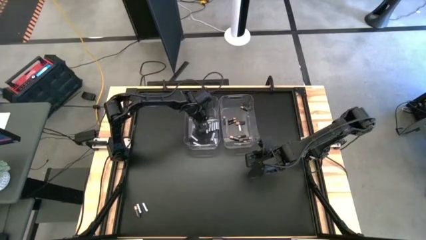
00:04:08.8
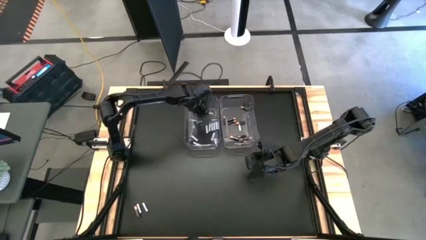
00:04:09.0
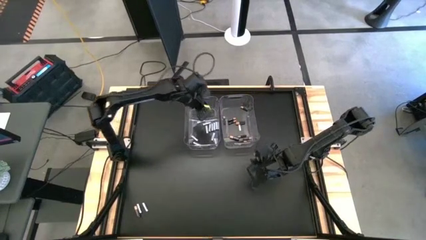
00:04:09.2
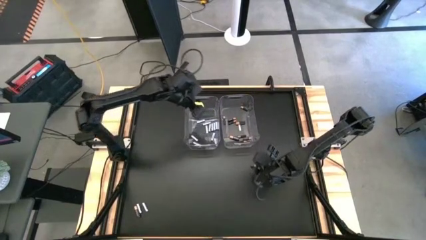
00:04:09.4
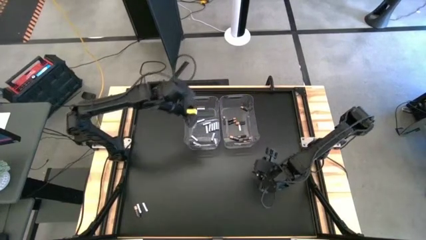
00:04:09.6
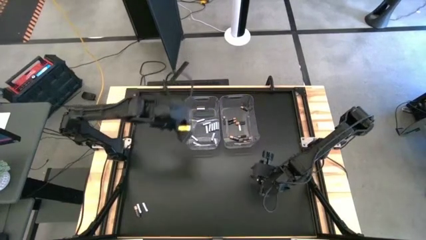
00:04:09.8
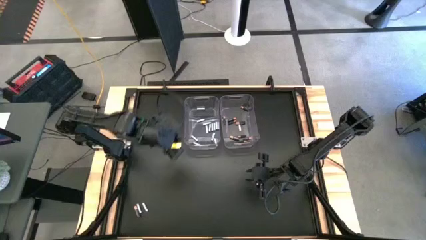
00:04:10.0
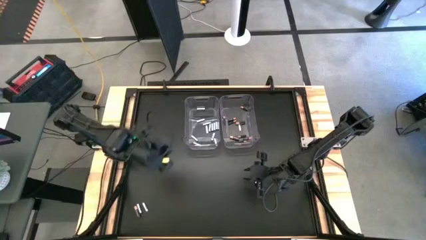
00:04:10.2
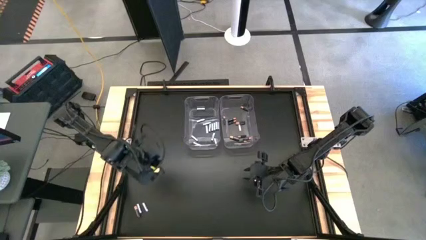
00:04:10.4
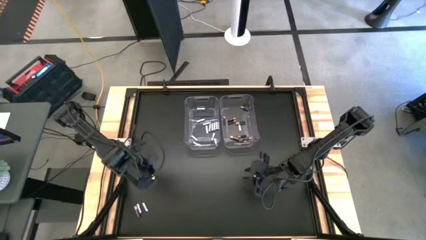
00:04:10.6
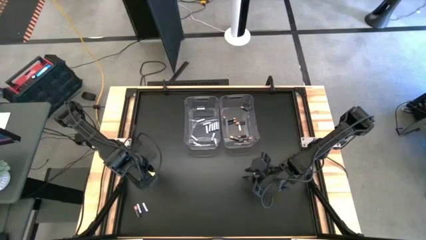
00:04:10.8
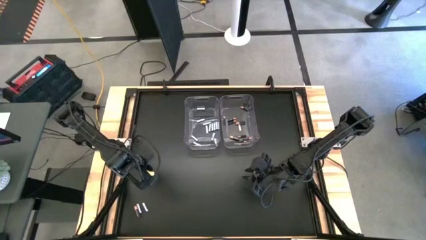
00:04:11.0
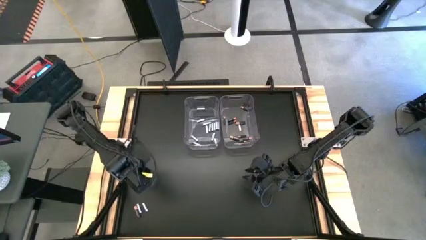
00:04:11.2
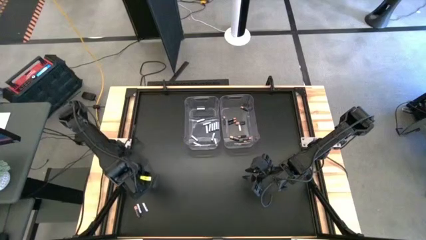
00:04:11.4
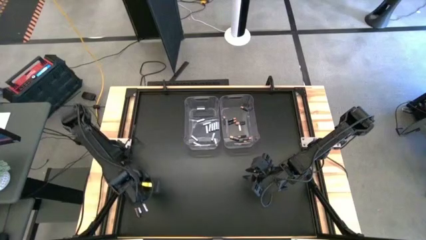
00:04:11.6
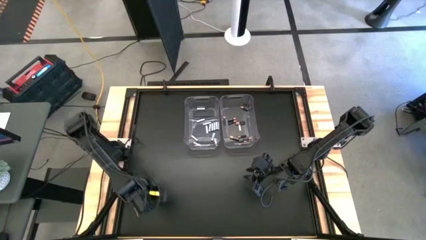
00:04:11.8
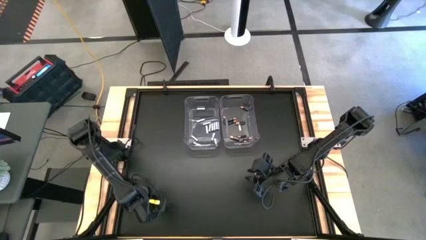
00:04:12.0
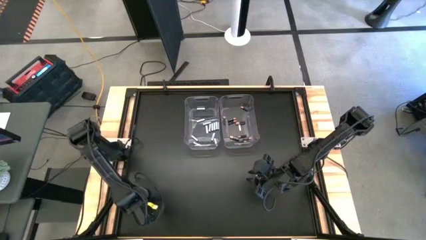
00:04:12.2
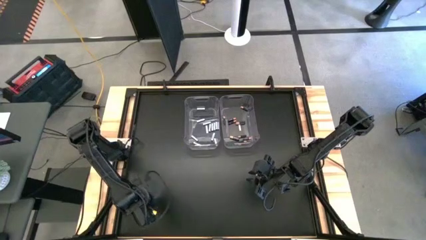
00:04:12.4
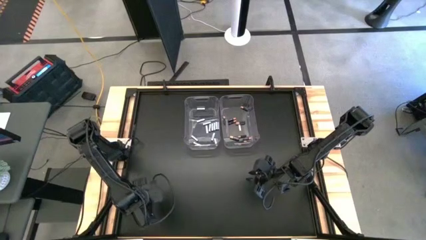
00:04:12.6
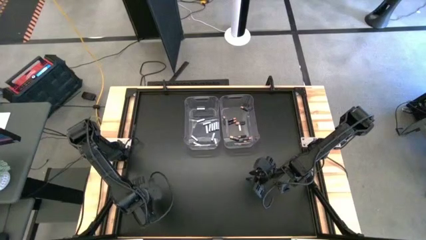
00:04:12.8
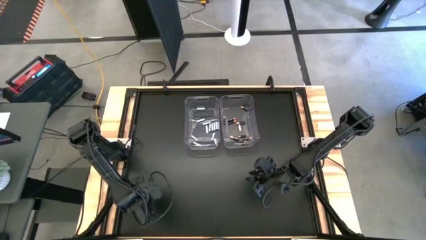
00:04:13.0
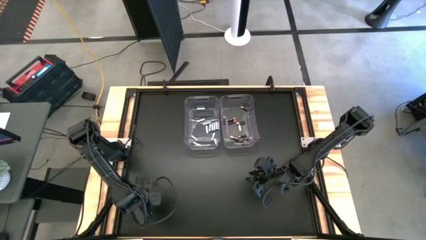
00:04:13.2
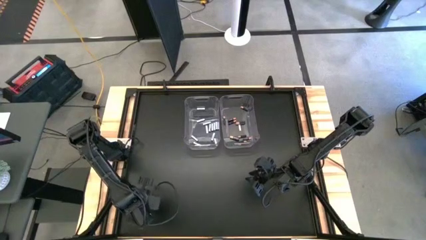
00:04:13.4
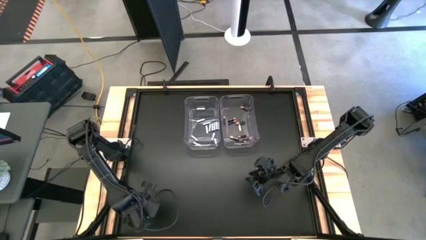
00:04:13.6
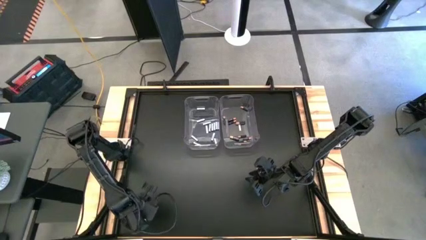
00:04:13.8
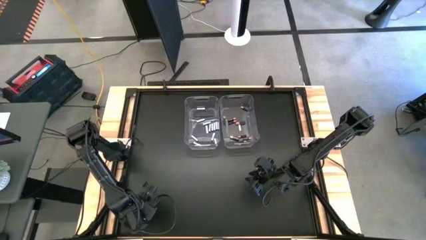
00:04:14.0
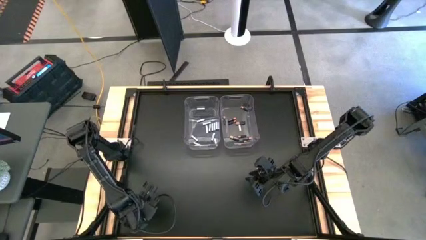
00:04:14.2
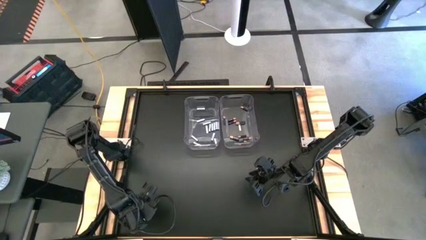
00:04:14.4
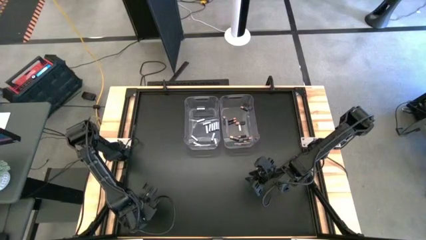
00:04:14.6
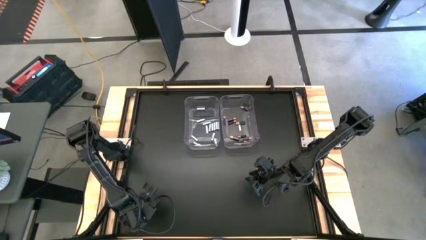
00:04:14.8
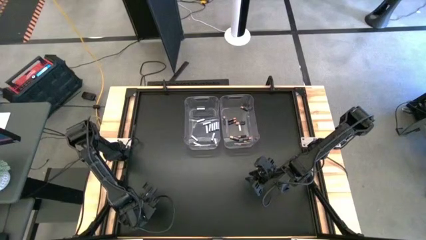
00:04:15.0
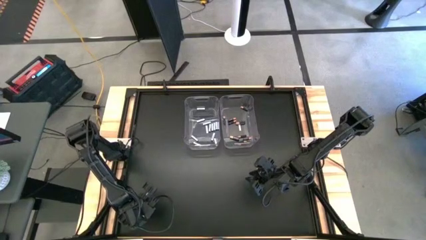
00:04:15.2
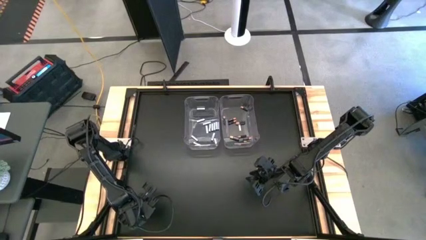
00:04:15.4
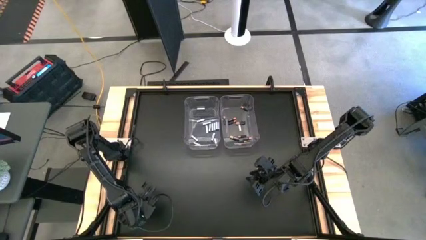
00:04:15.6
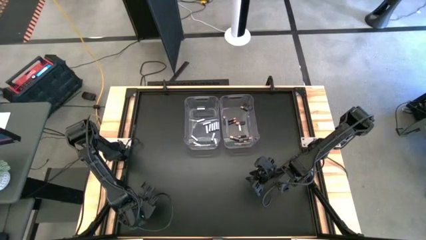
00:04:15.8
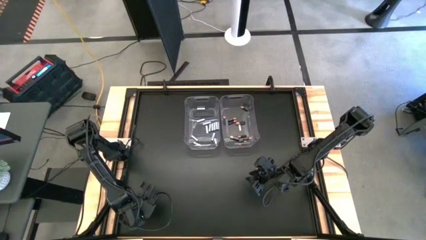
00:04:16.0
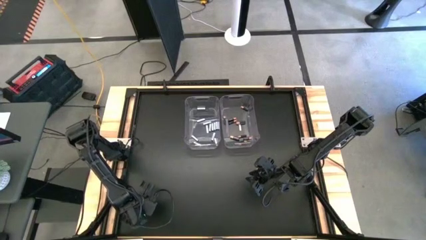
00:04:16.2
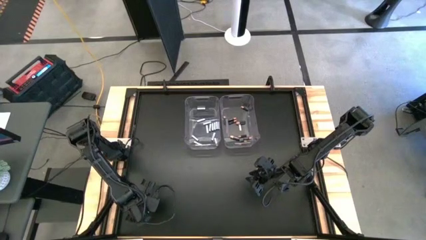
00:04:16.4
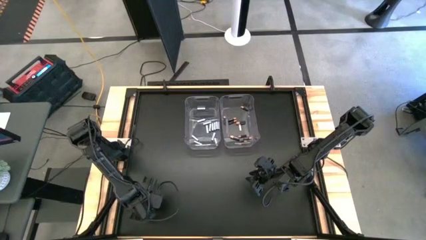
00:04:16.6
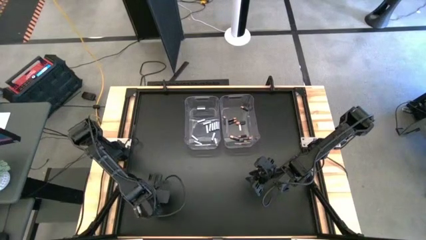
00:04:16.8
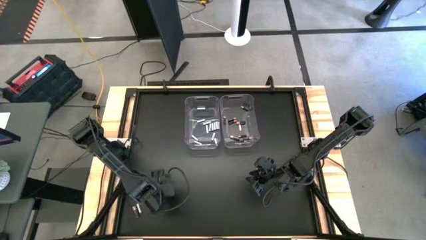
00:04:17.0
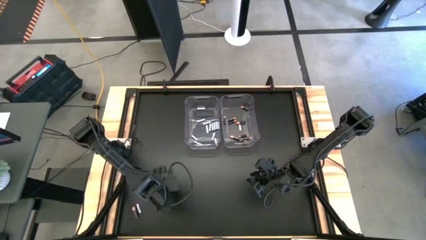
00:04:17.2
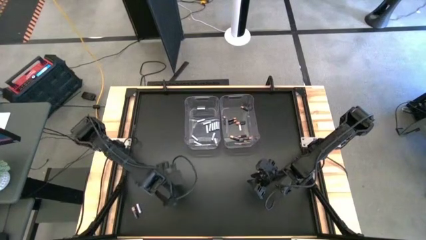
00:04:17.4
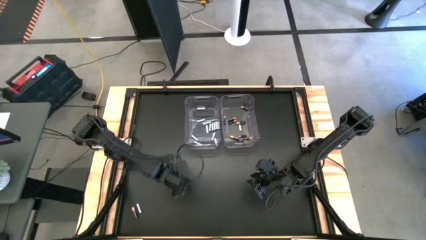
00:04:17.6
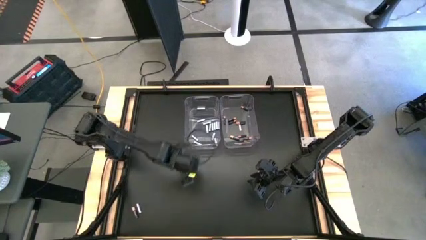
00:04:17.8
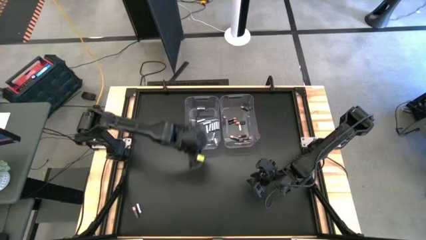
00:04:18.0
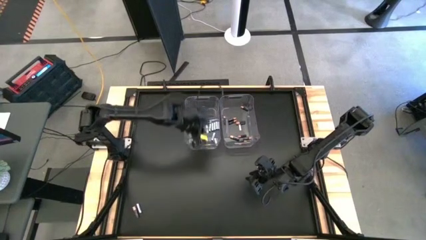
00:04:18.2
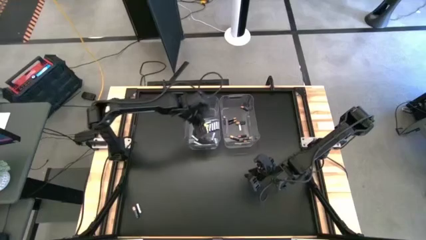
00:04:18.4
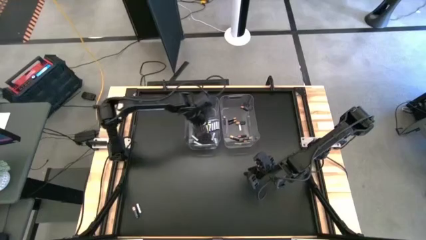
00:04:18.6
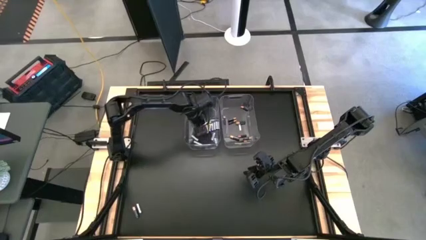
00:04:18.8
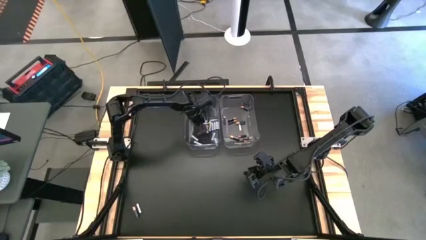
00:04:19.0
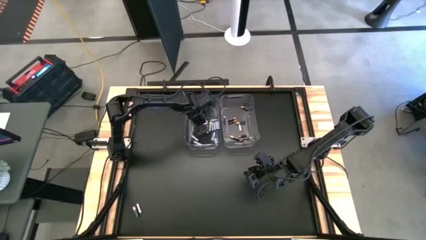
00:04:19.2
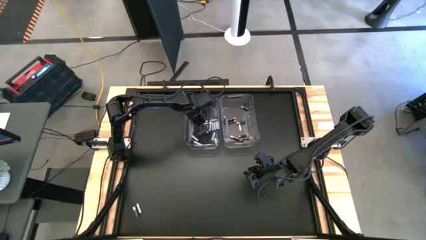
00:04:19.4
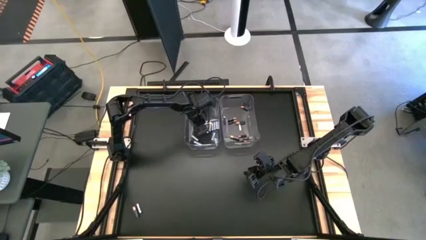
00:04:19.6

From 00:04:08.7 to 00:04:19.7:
Task: Sort batteries
Put the white battery into the left transparent bin

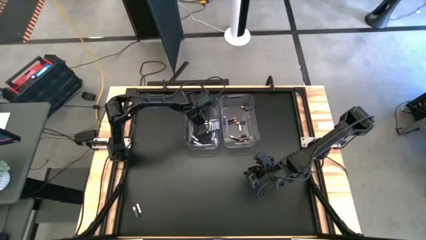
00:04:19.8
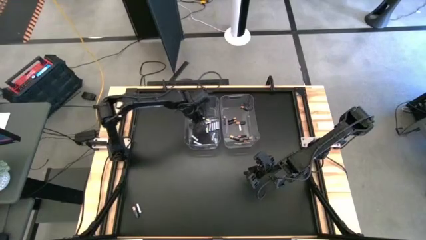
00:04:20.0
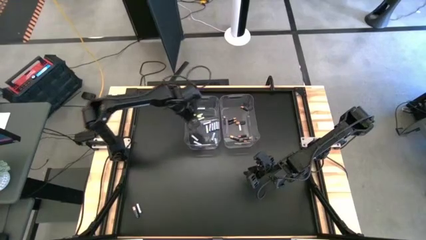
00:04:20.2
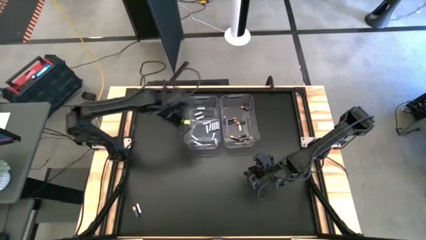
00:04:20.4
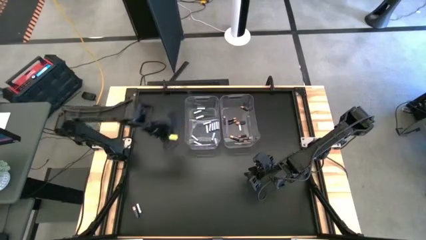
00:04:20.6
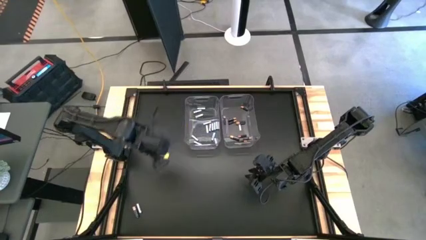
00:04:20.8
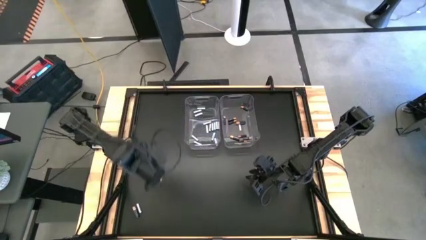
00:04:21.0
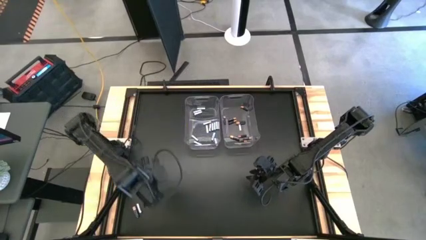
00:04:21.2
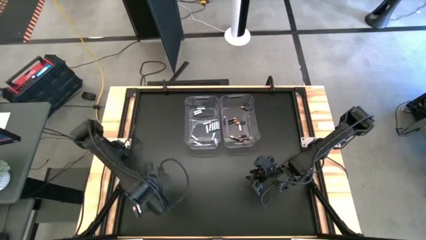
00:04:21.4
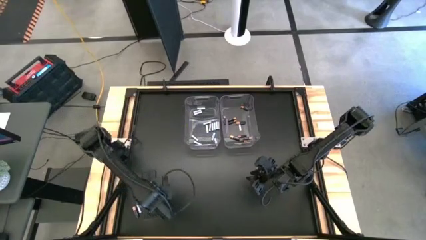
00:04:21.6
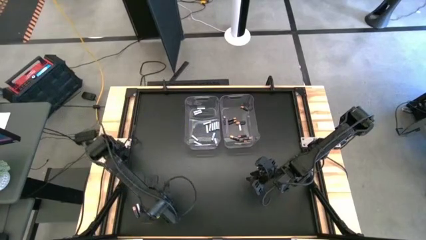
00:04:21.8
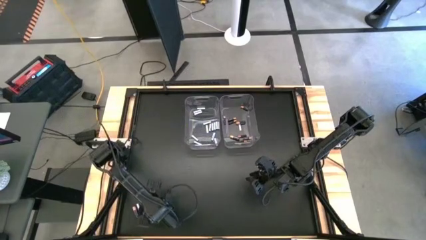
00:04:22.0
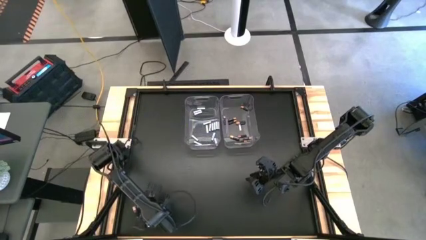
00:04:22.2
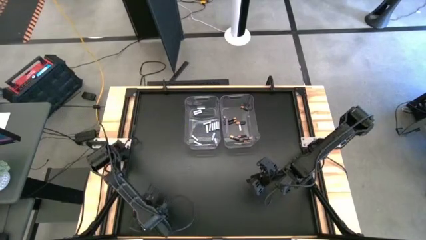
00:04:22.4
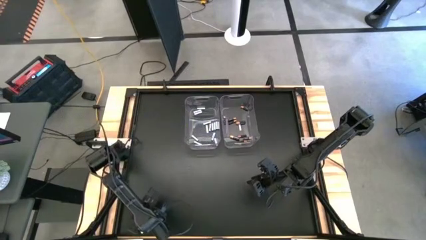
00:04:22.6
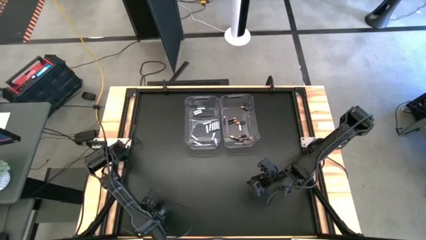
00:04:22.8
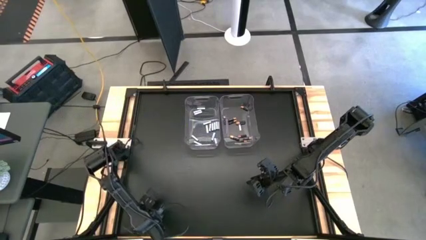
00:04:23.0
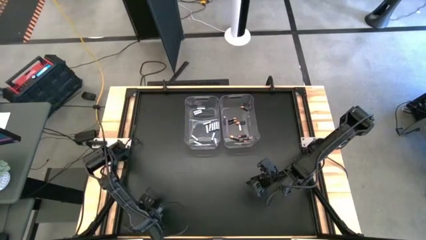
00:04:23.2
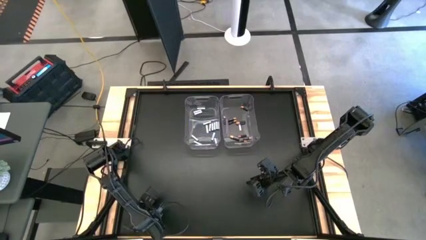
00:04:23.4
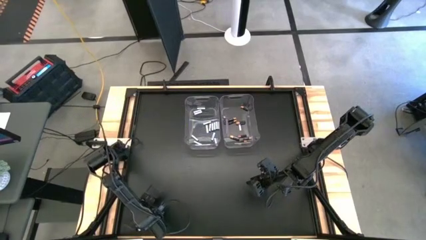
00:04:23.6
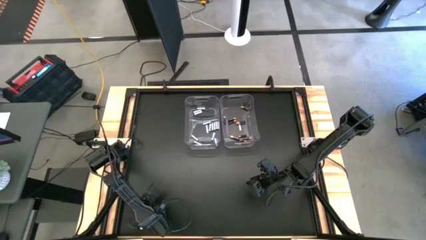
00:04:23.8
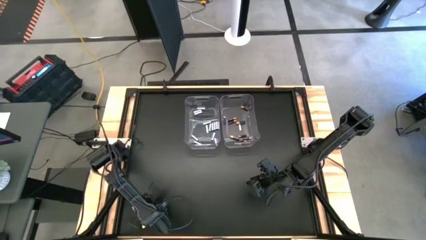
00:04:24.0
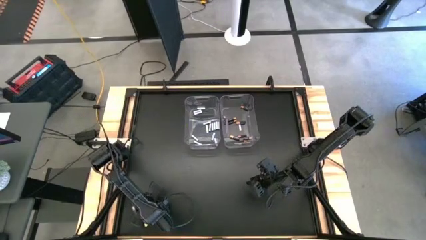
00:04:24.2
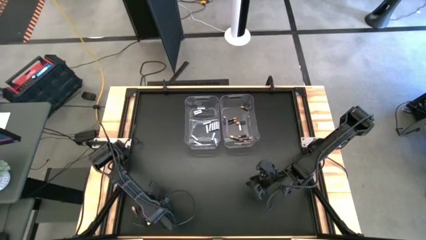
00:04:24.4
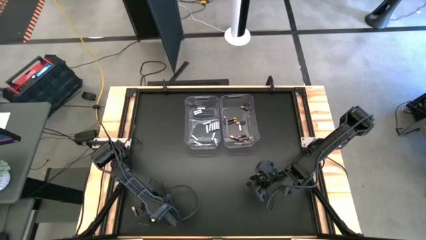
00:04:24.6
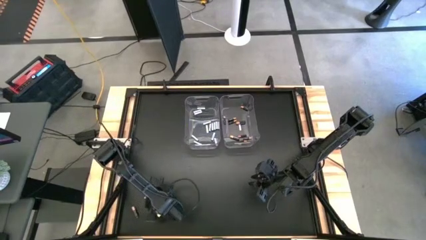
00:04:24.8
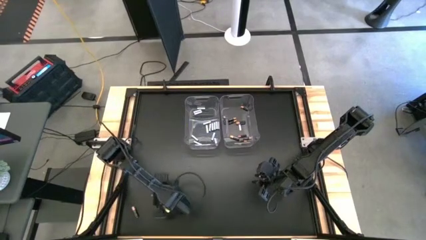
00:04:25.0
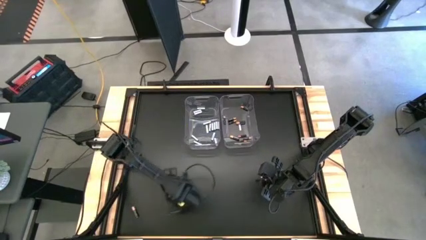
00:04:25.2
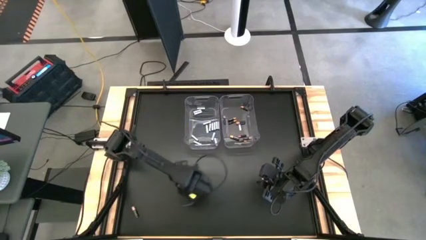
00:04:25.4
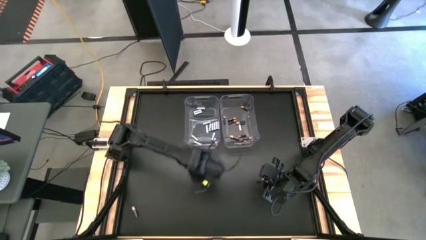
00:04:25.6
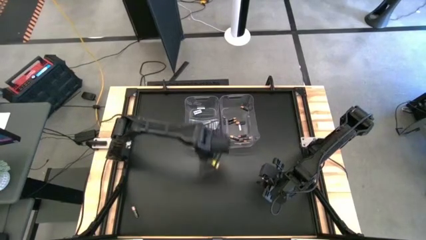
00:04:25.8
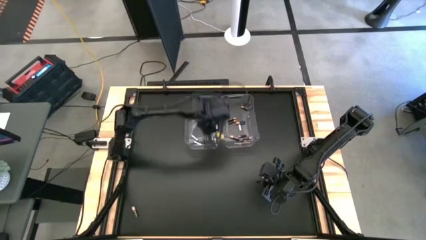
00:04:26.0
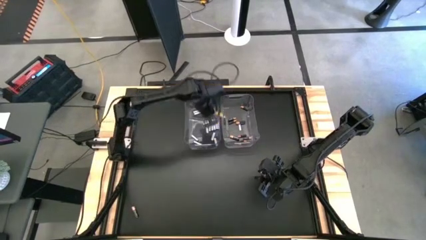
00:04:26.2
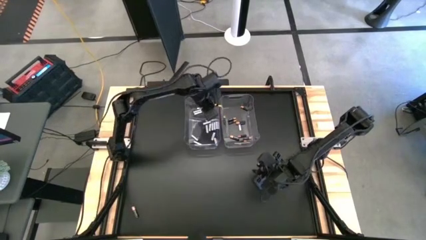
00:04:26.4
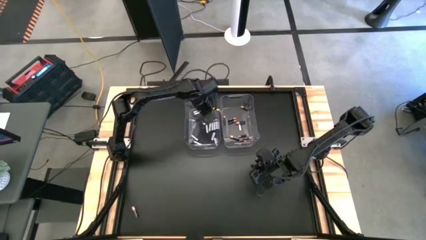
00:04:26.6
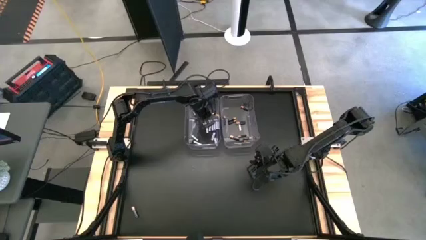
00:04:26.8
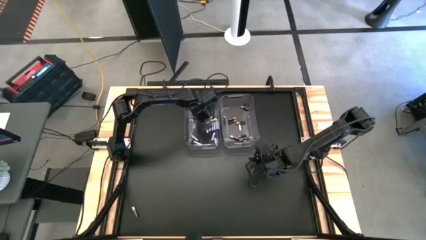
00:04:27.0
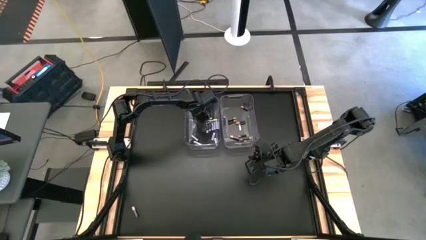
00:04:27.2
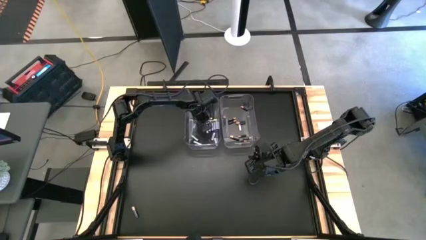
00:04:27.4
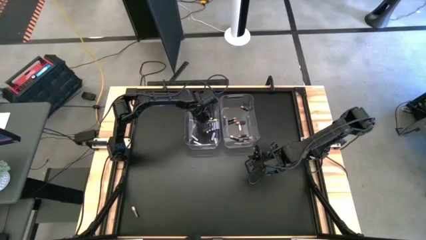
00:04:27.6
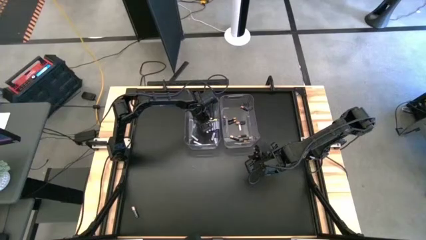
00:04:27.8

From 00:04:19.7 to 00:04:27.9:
Put the white battery into the left transparent bin
